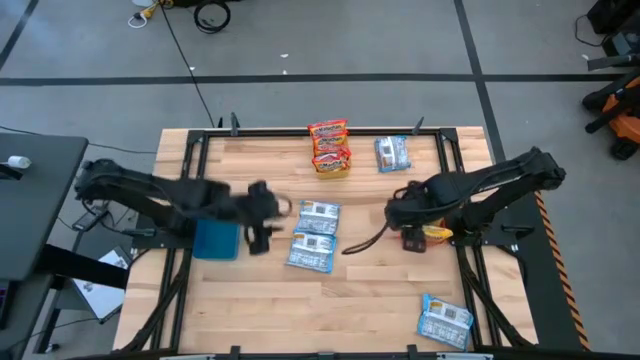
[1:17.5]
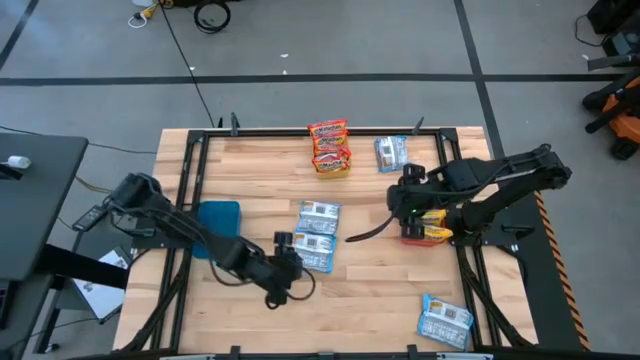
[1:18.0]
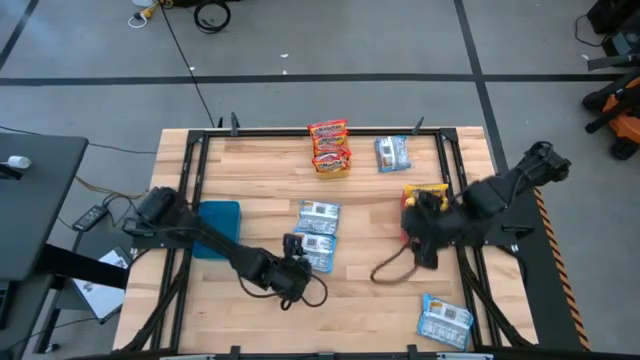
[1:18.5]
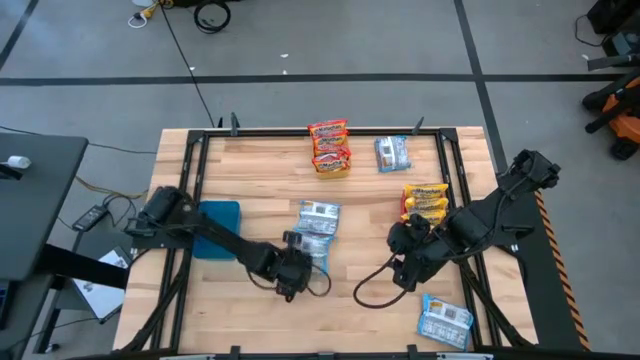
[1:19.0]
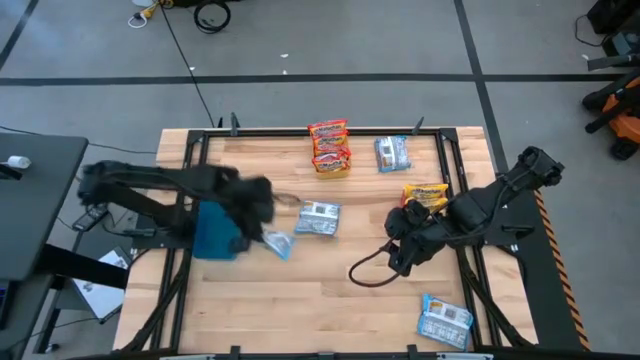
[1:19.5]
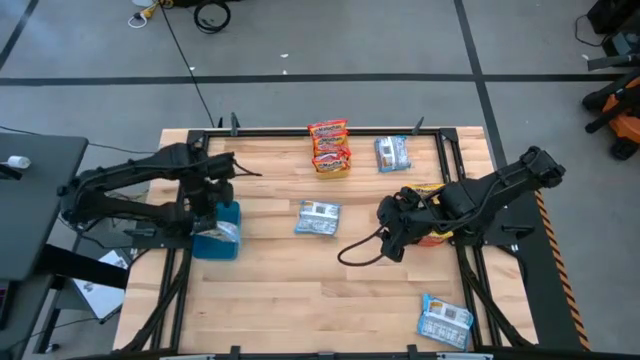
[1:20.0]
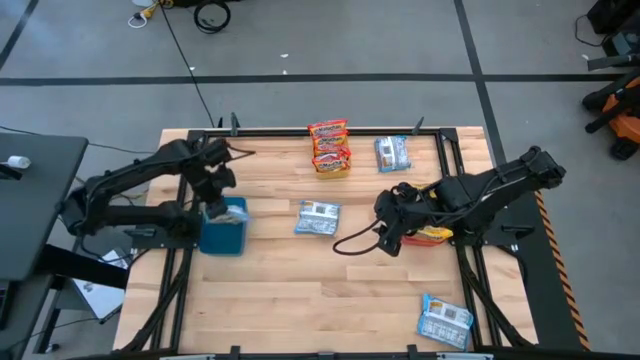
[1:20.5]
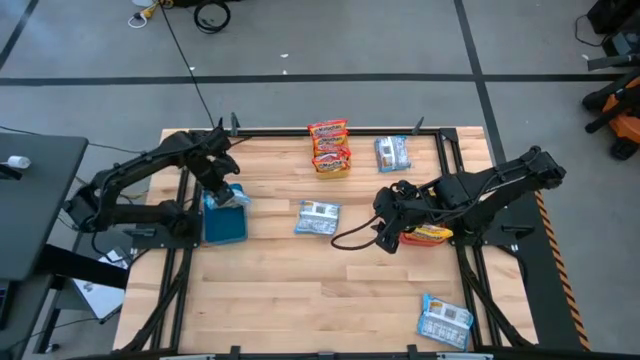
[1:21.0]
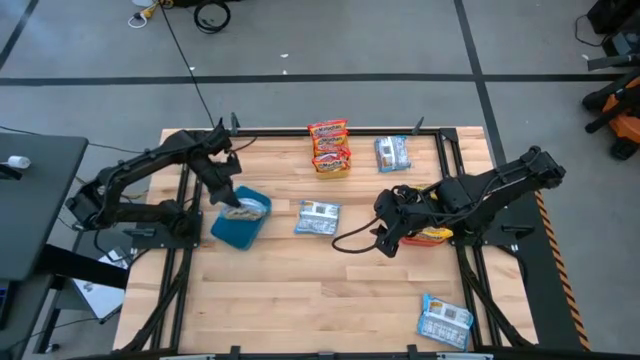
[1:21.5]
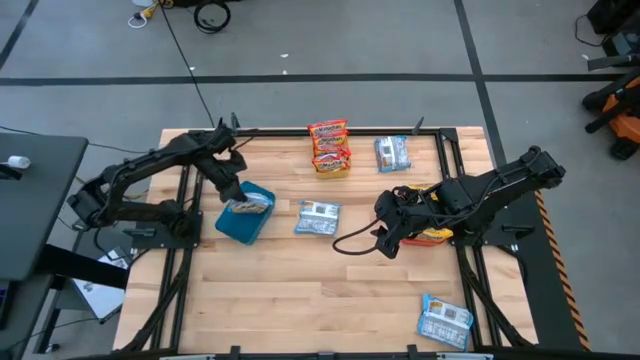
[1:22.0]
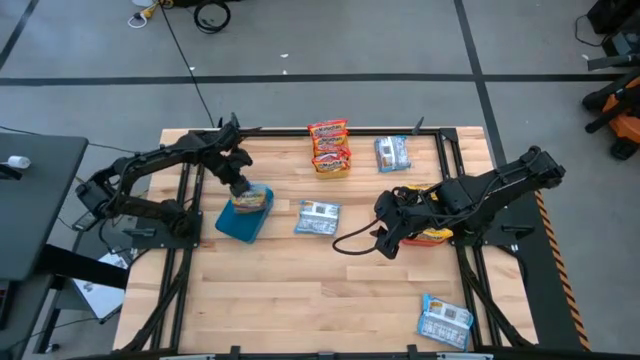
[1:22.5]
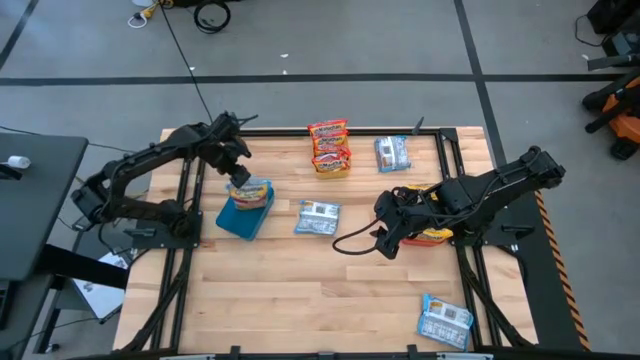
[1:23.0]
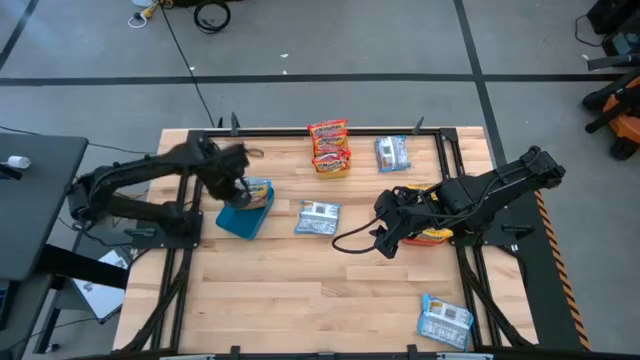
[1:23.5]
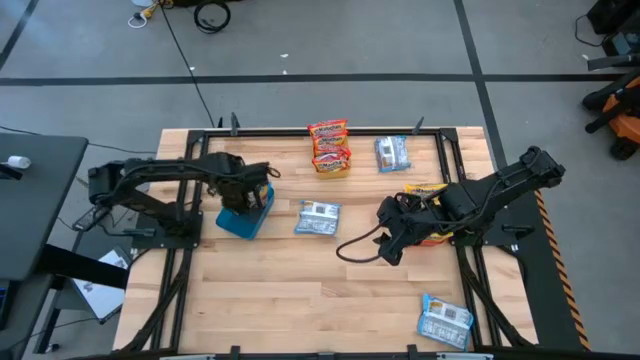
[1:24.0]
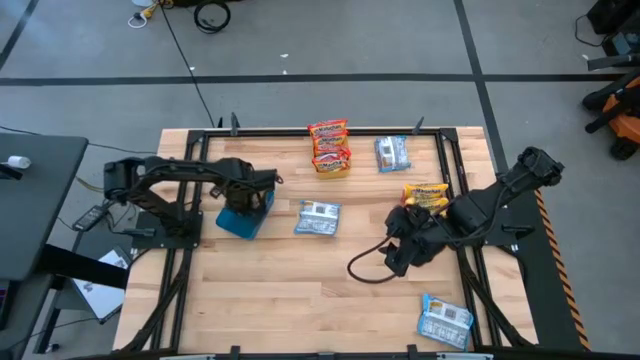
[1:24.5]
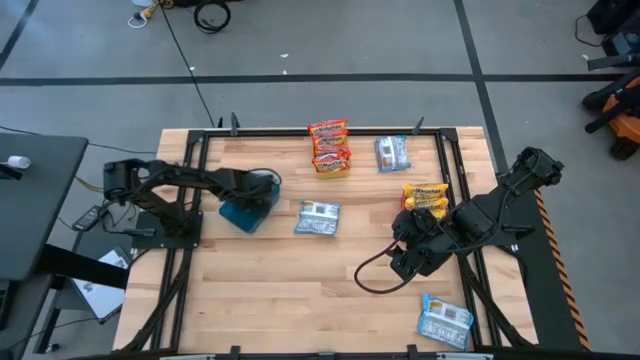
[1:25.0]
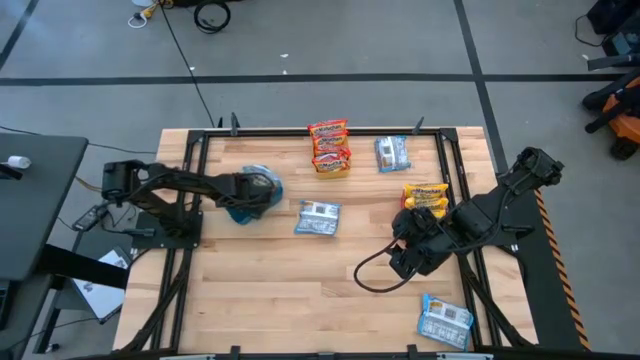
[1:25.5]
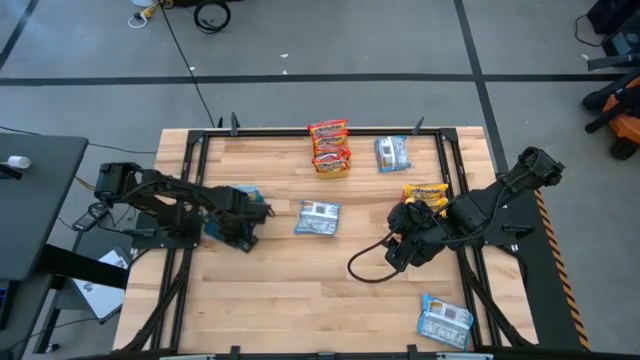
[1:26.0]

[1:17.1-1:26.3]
Task: Sort Maruchan noodles
Put the bottom left blue noodle pack into the blue bin

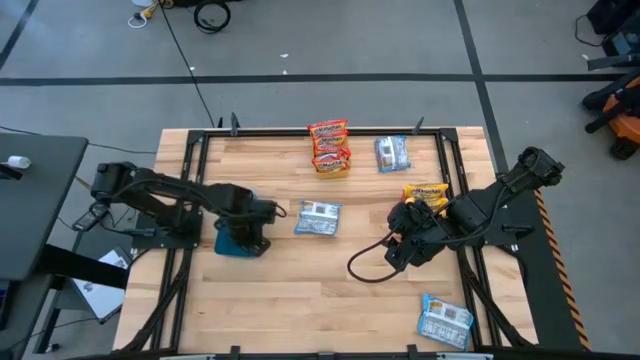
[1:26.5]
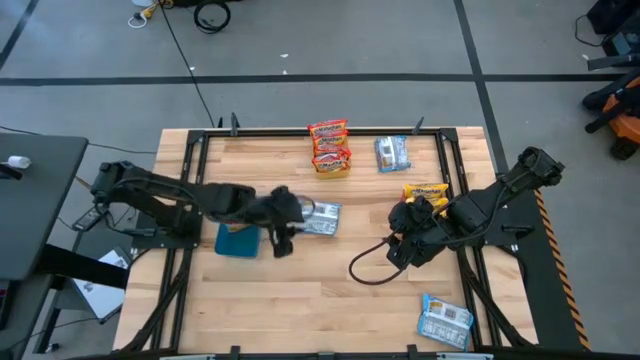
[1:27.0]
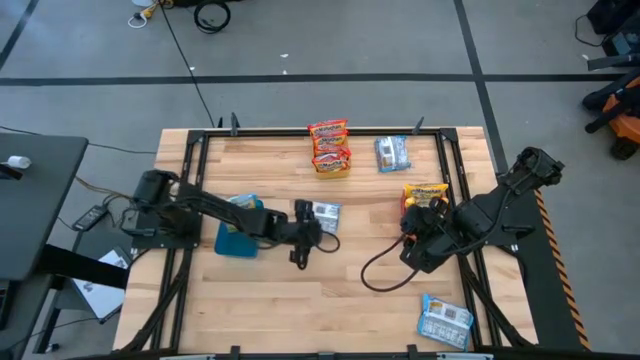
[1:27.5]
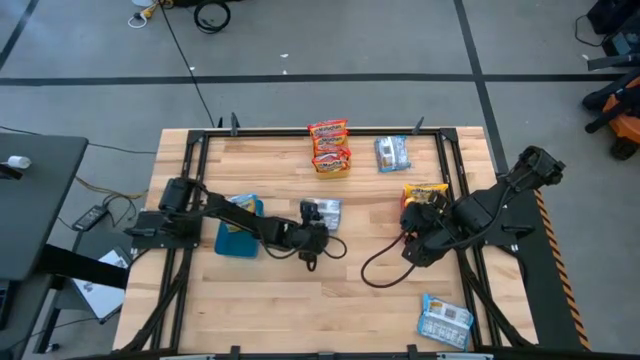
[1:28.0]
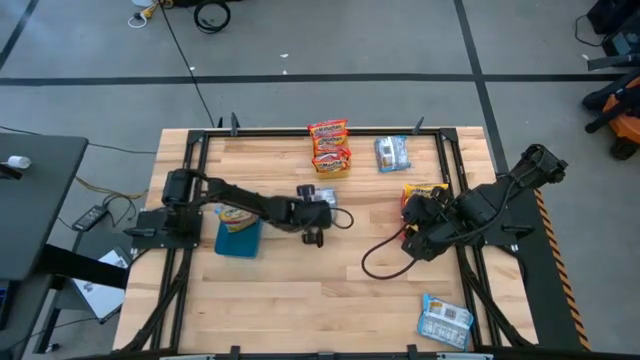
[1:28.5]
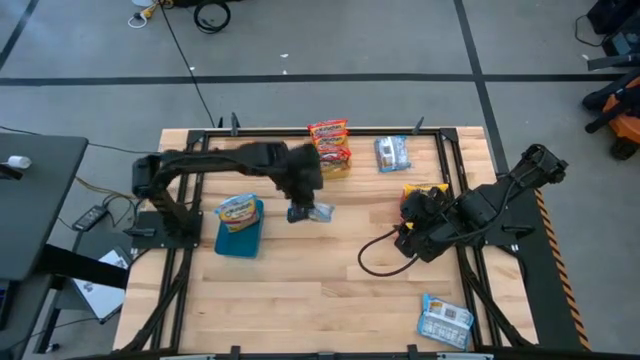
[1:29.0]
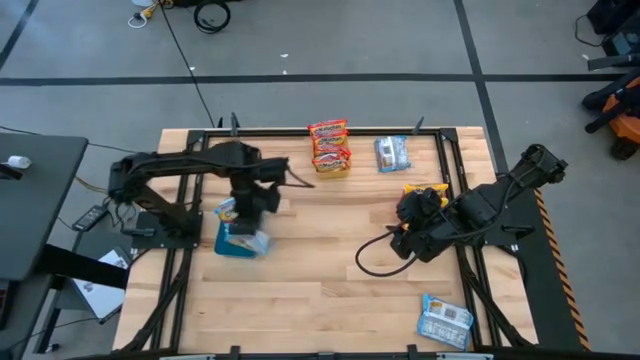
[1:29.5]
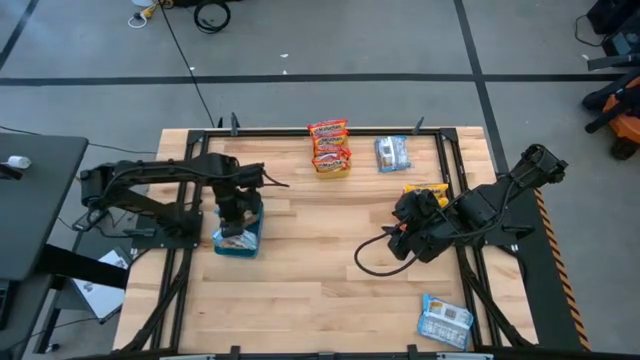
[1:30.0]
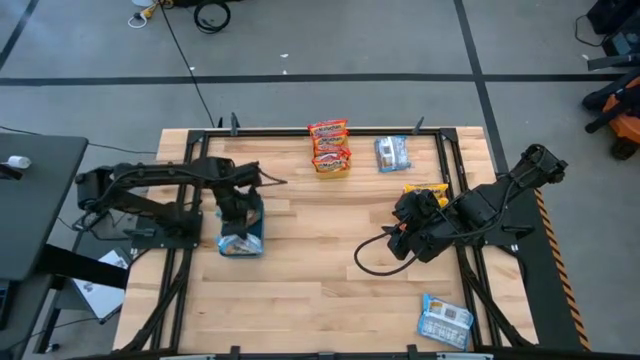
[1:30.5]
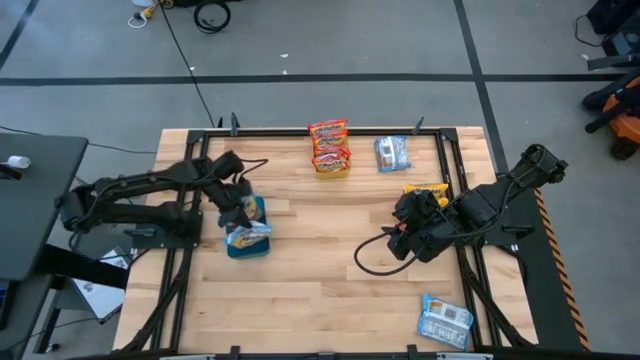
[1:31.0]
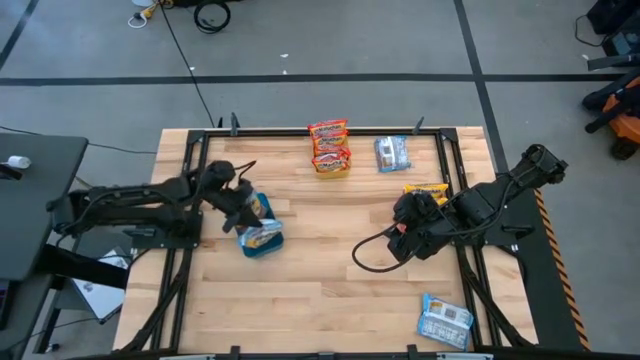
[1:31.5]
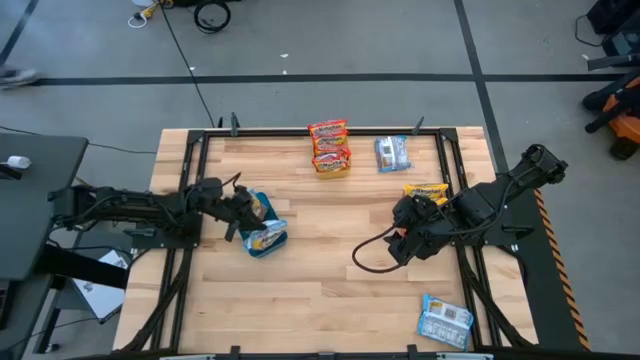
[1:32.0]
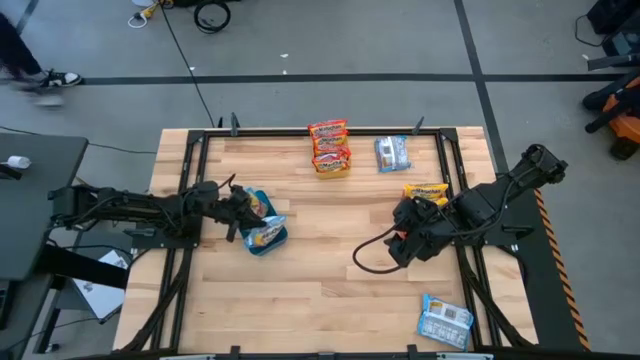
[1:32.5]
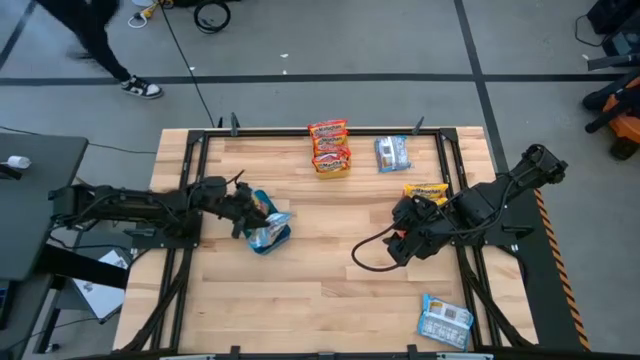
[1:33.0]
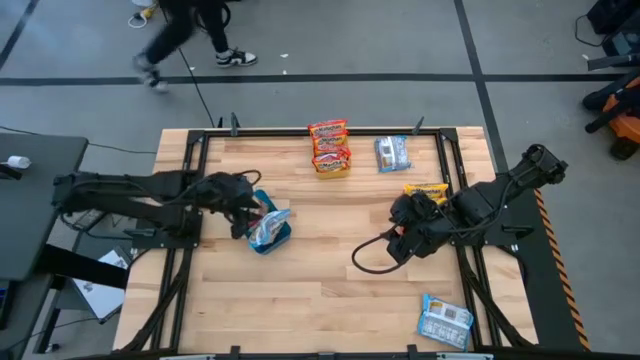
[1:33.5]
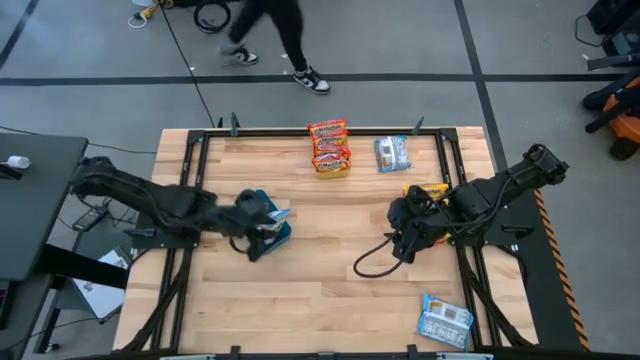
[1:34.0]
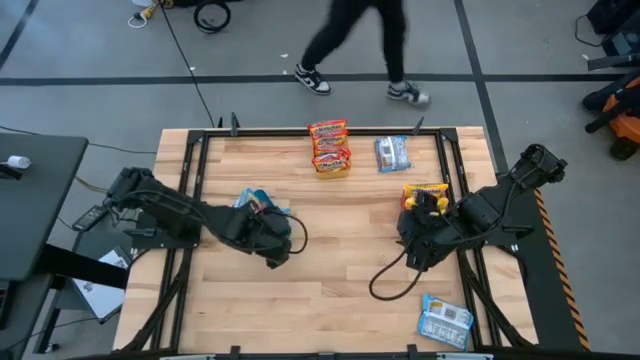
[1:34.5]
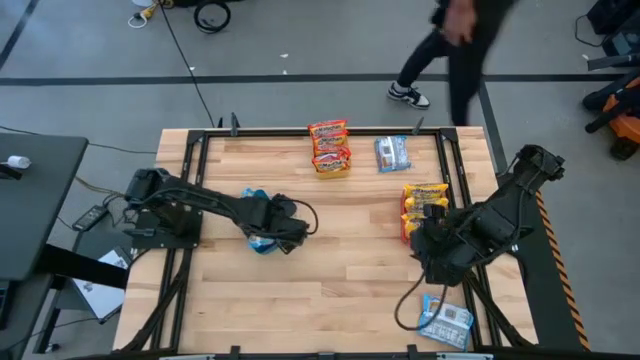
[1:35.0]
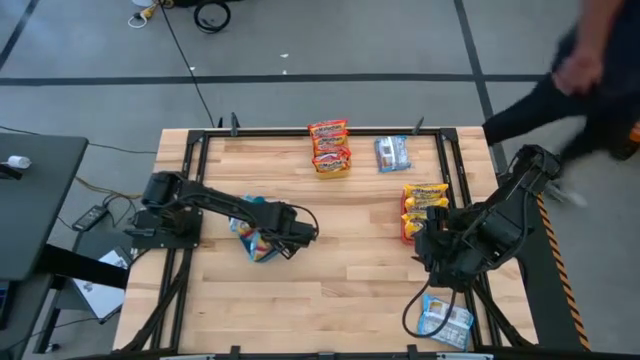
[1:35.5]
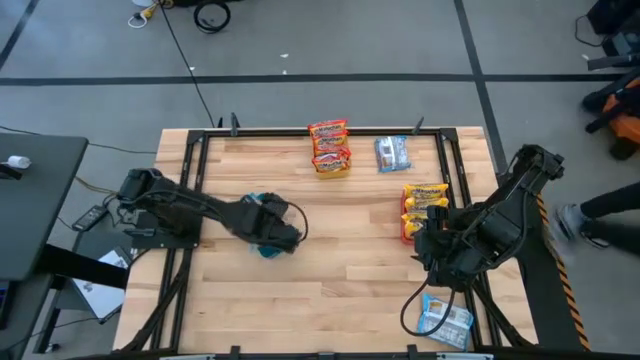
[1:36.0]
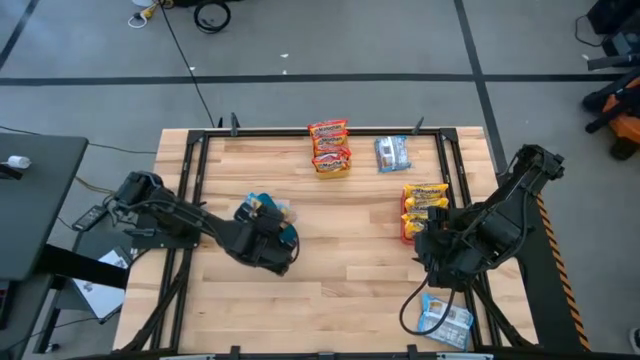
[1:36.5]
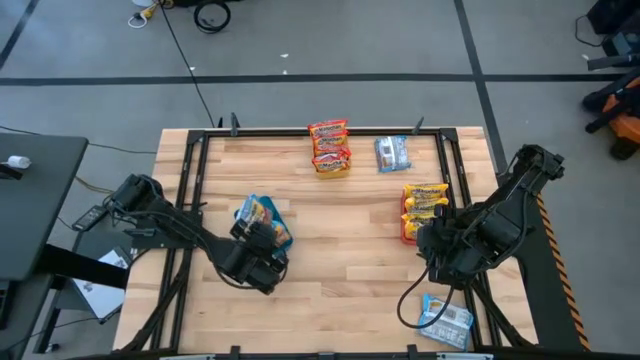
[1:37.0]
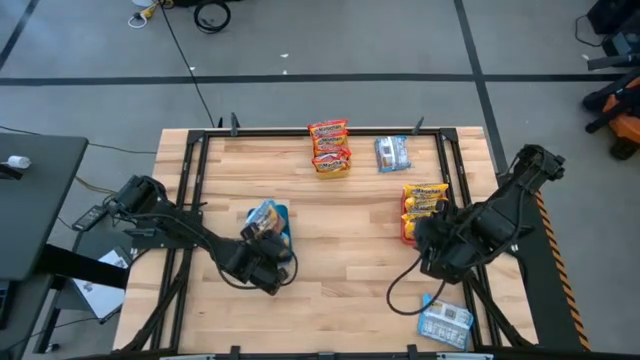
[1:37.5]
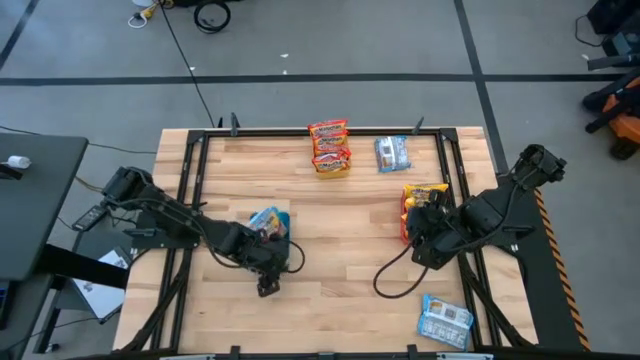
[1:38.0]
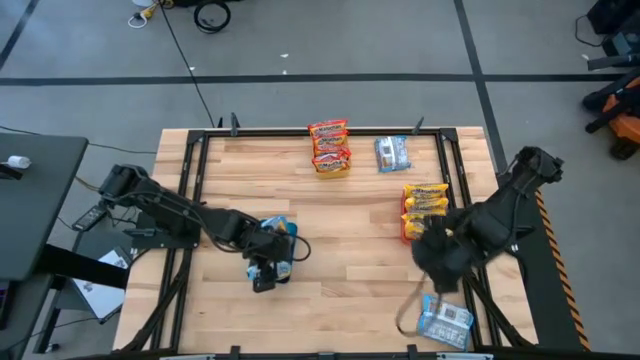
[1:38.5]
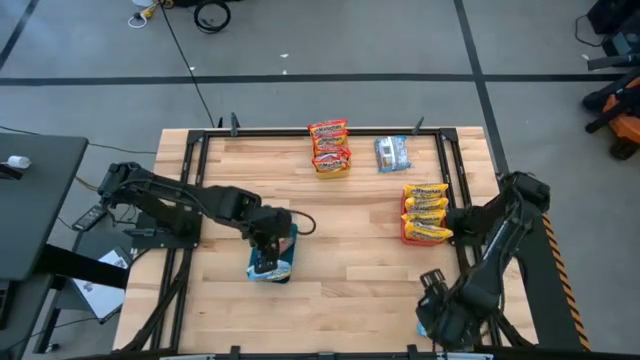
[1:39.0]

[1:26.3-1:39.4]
Put the middle left blue noodle pack into the blue bin
